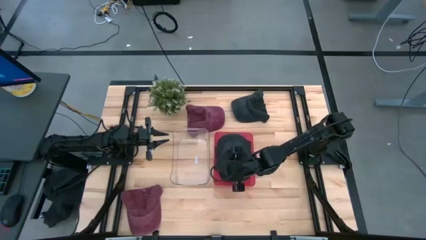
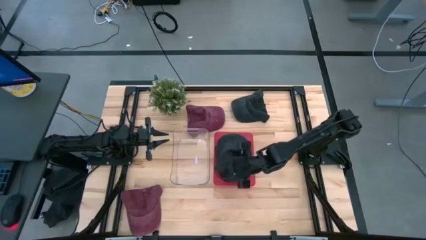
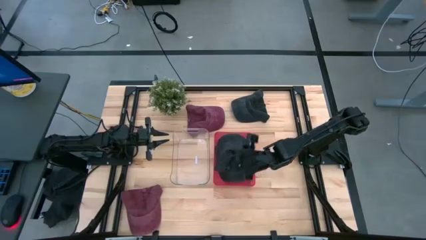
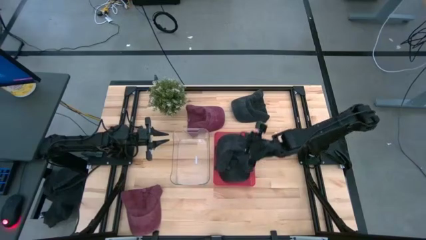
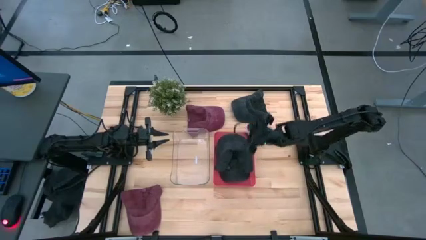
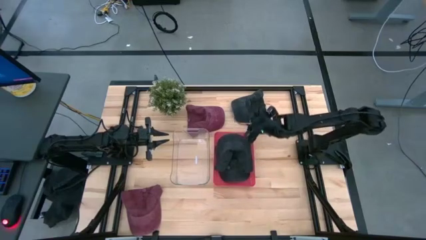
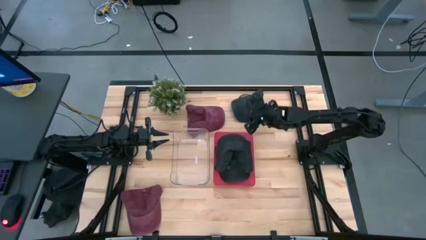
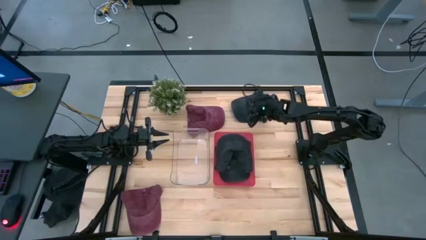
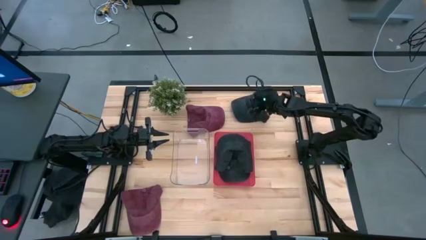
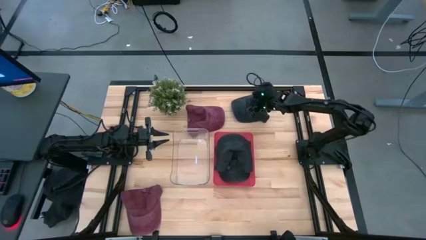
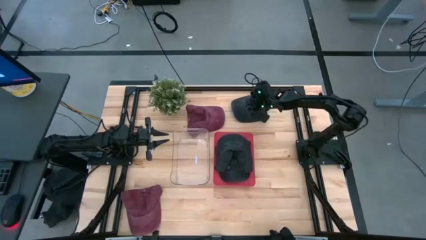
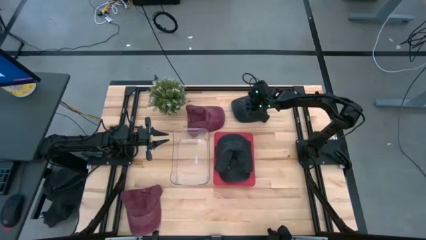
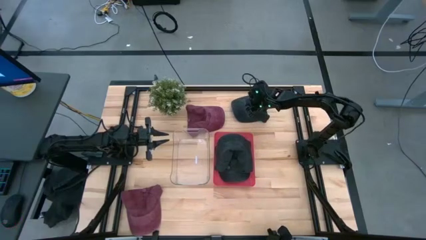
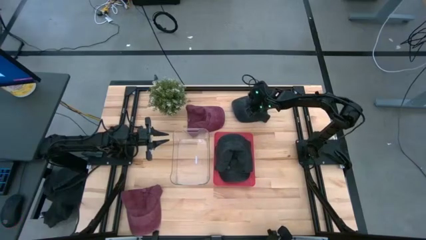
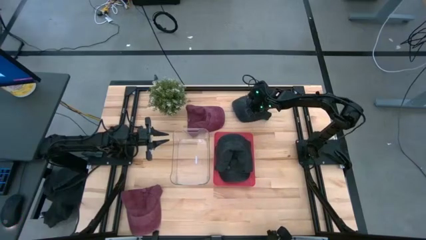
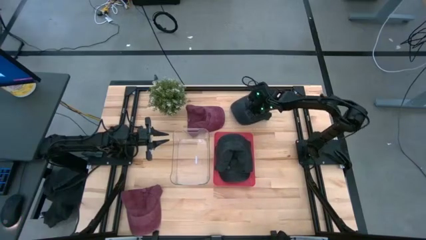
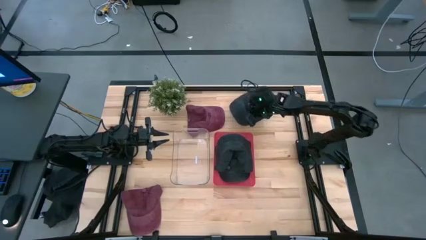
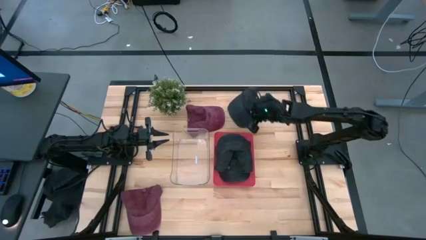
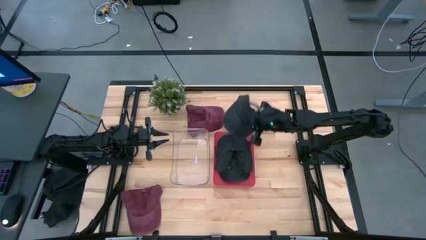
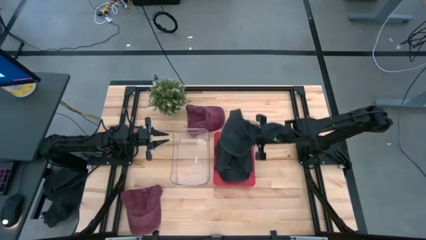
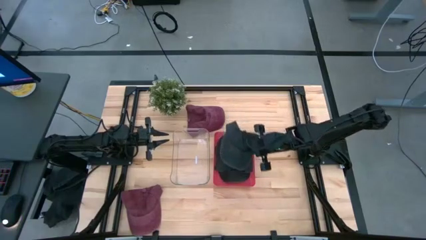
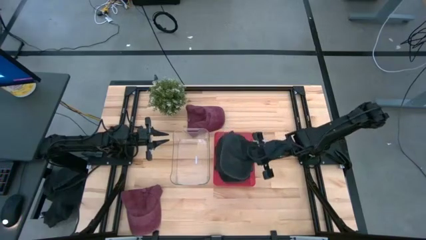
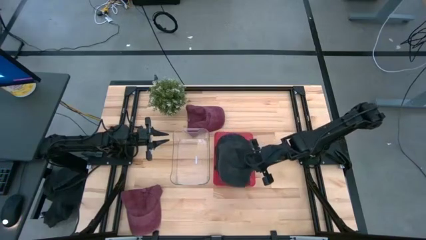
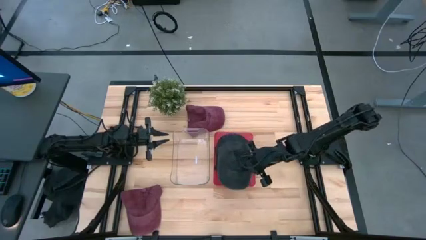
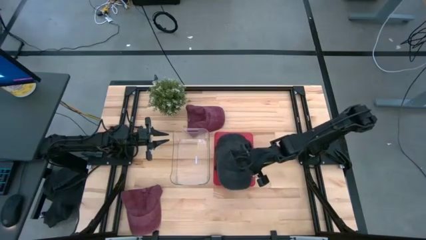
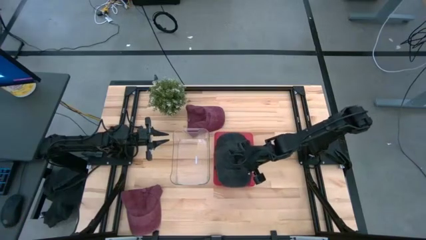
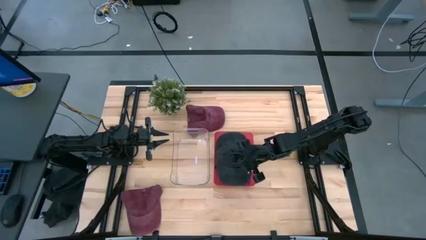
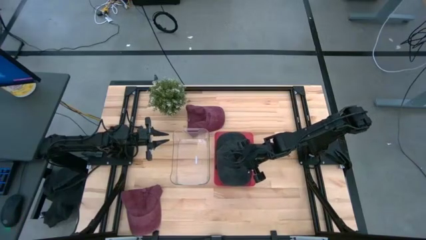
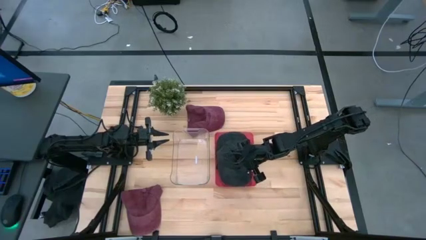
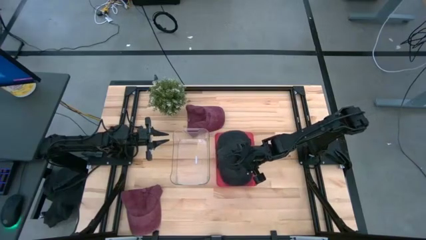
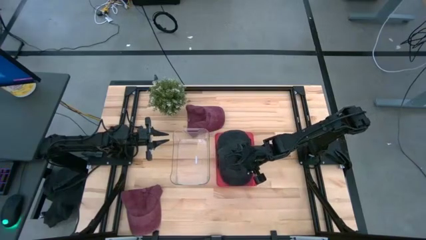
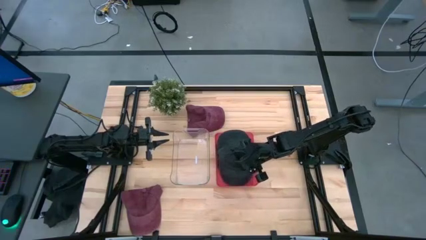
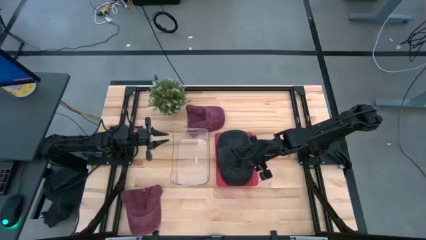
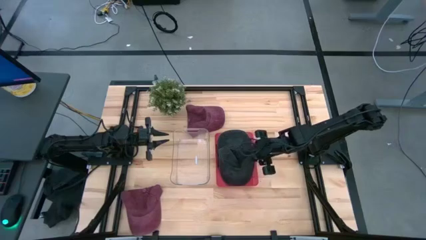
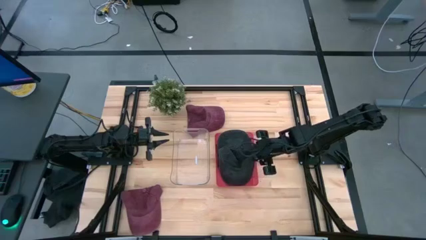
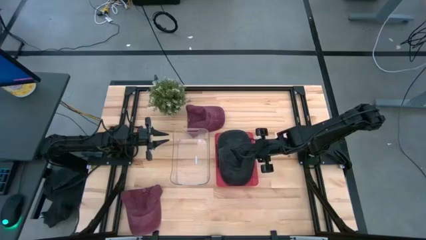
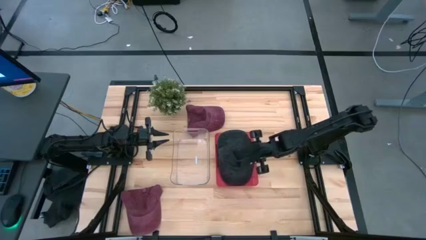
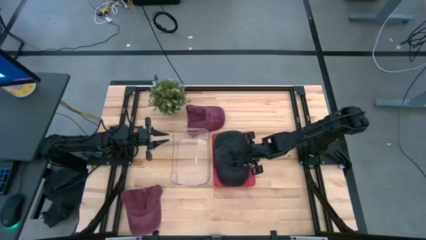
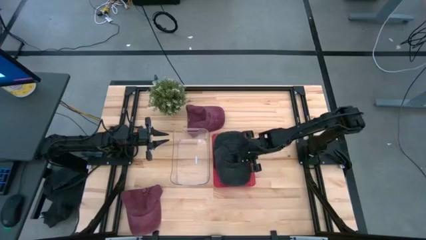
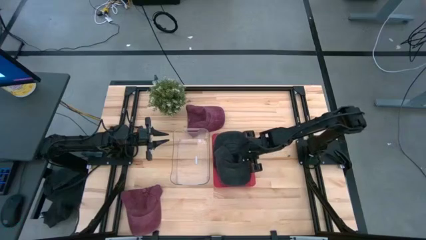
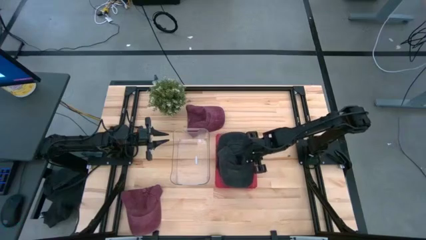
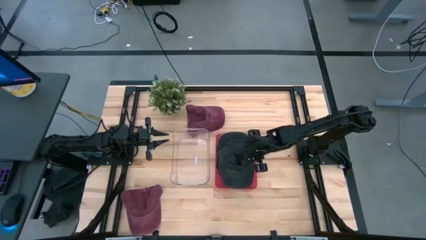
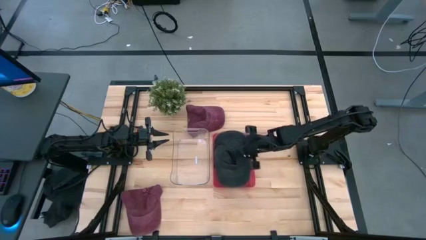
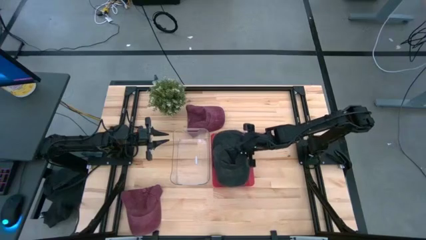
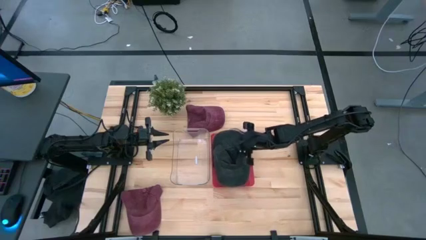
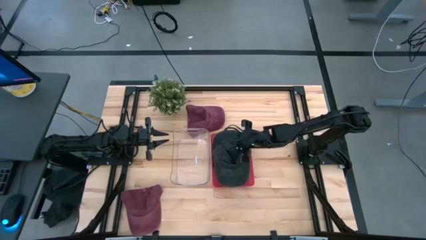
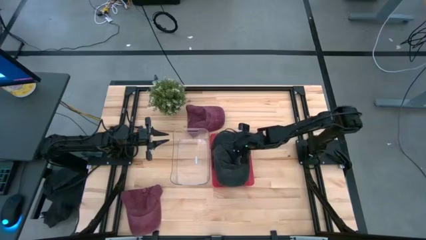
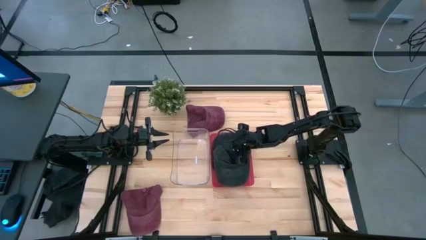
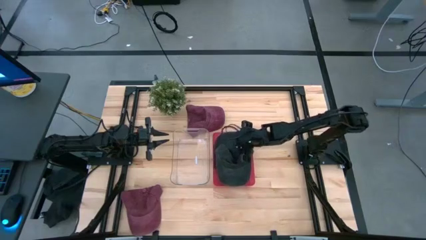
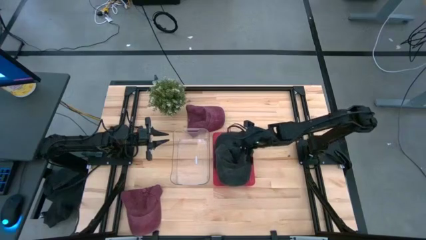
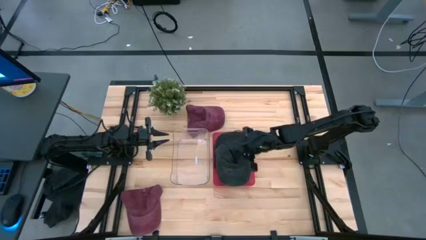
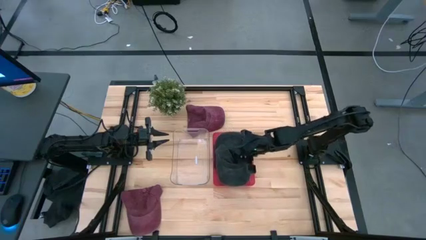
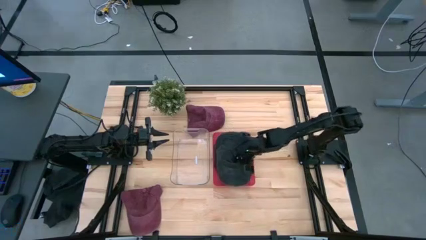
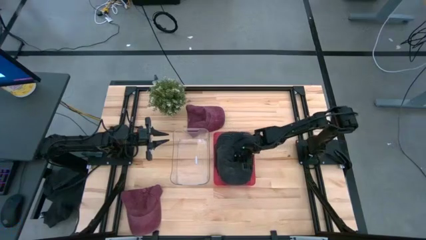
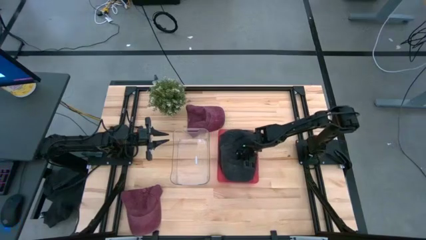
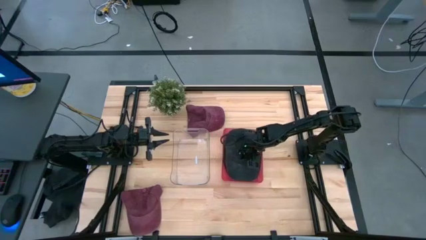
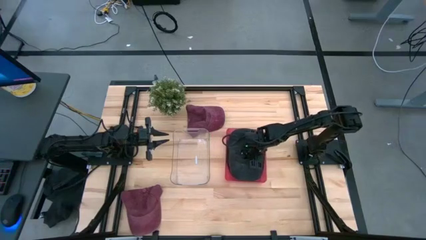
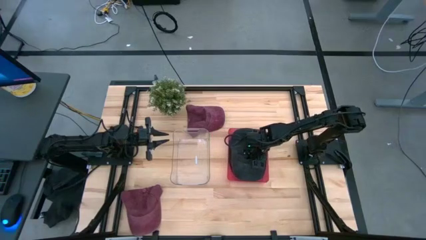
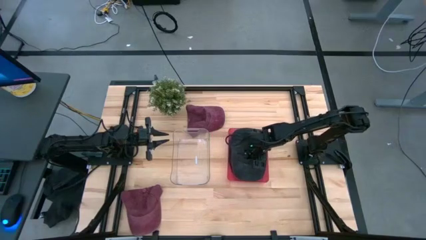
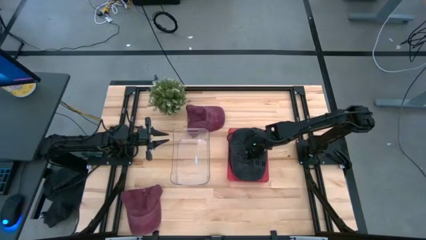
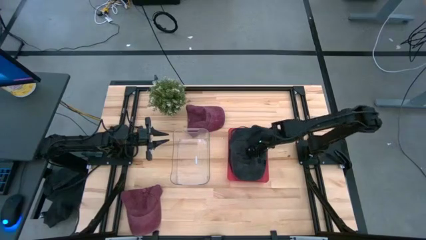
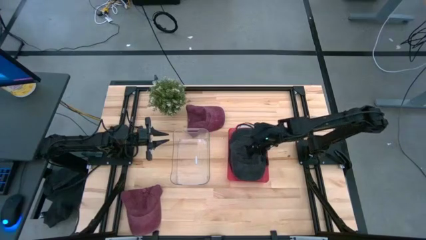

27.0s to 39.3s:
Task: Pick & Place hat
Put the black cap into the red bin

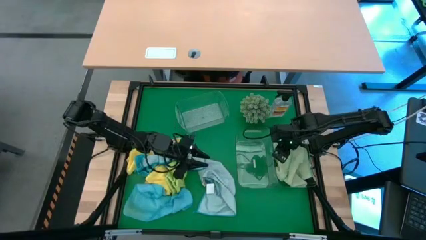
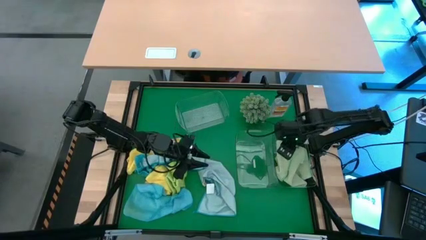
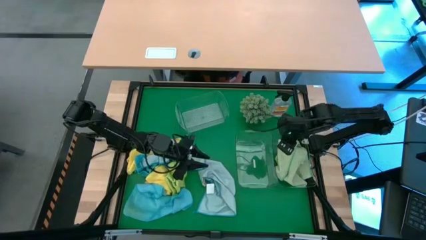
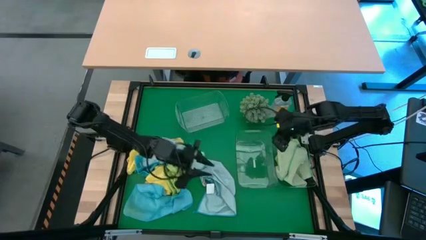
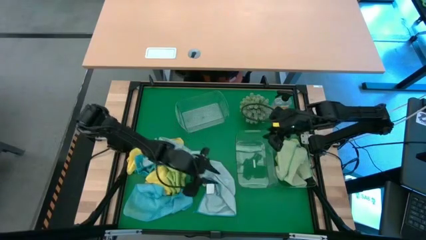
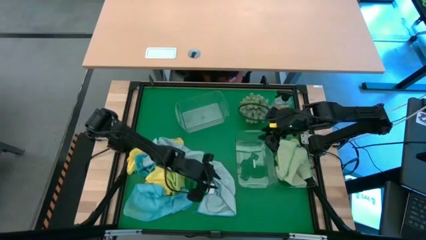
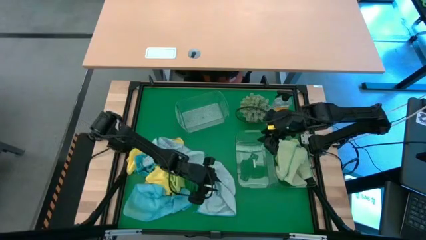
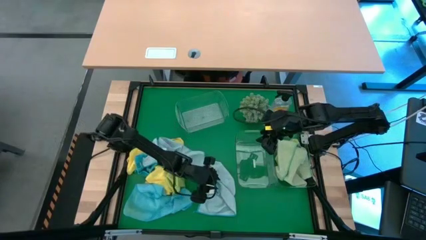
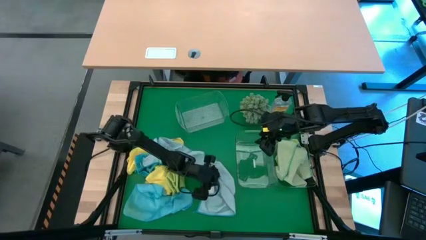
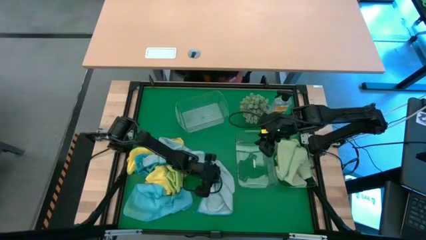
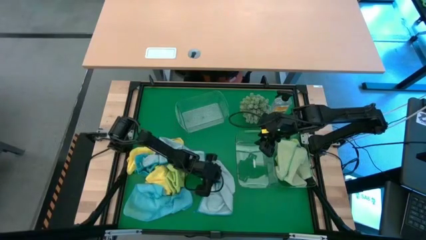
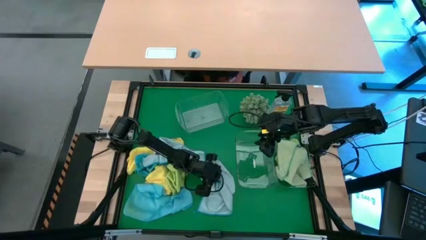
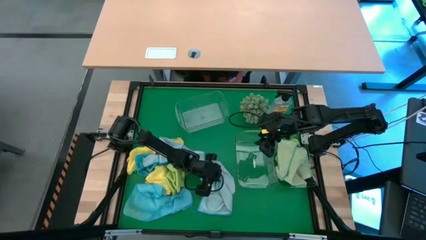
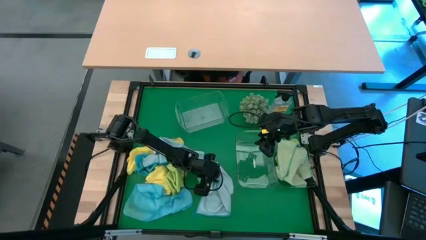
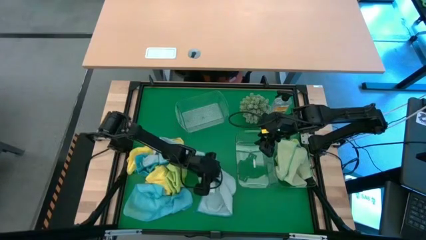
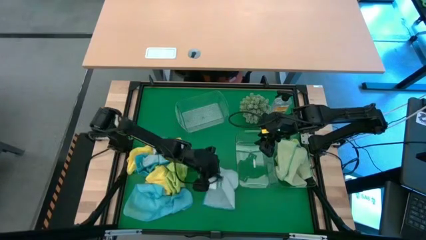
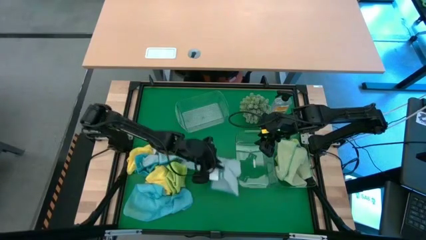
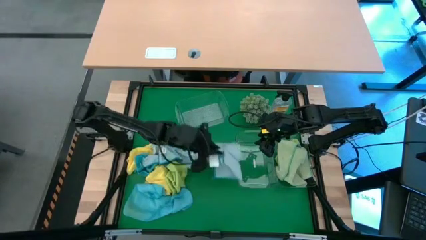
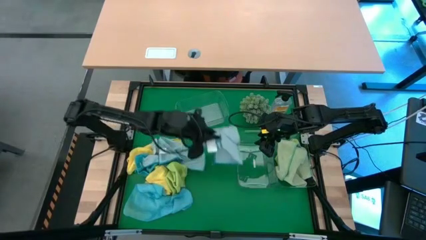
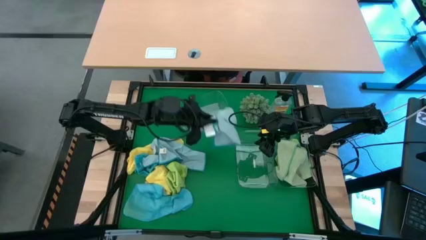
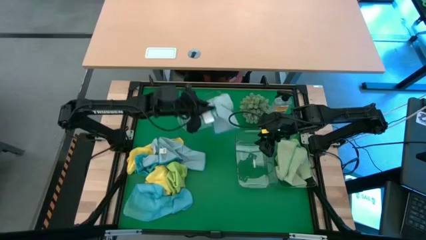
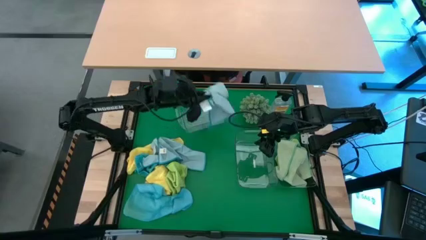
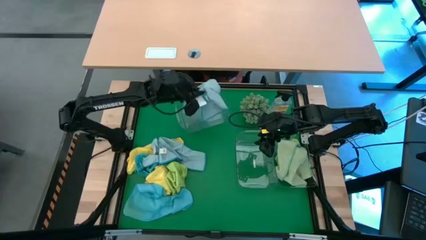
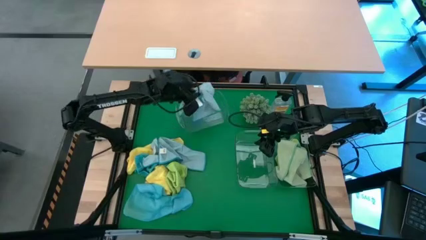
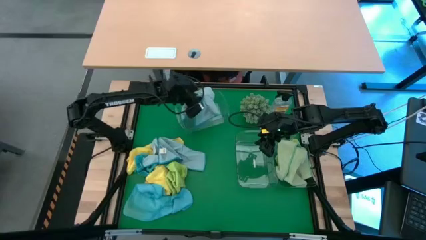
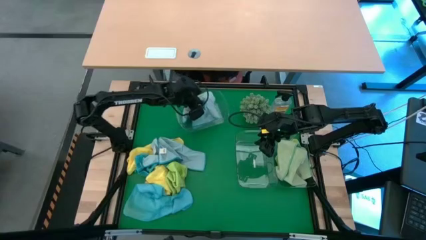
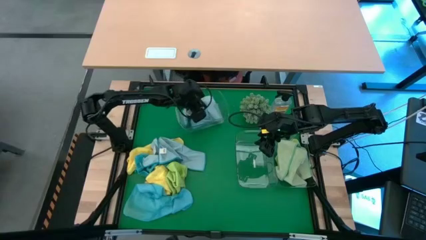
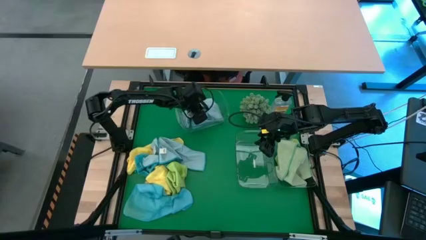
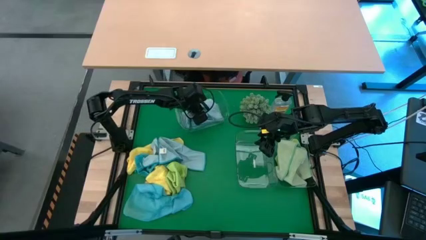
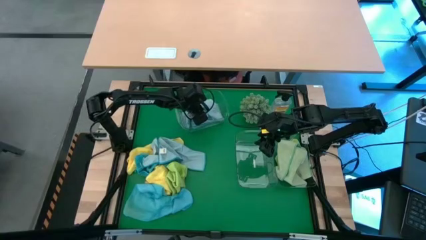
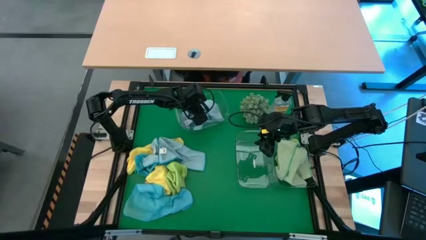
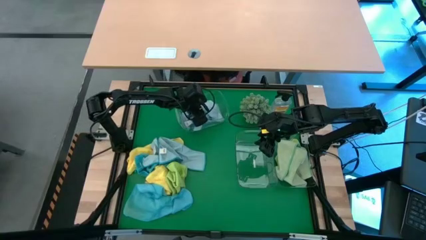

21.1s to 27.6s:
Task: Sort microfiber towel by color & place in baskets
Put the bottom right blue towel into the top transparent bin
